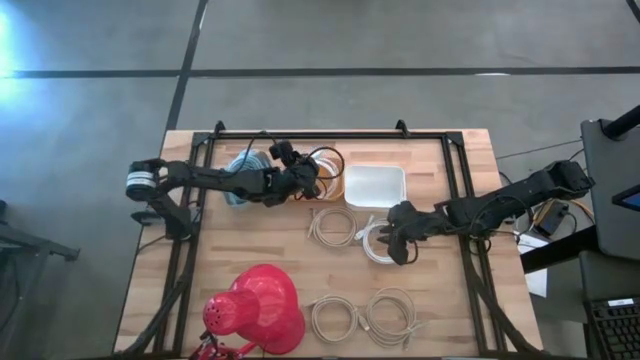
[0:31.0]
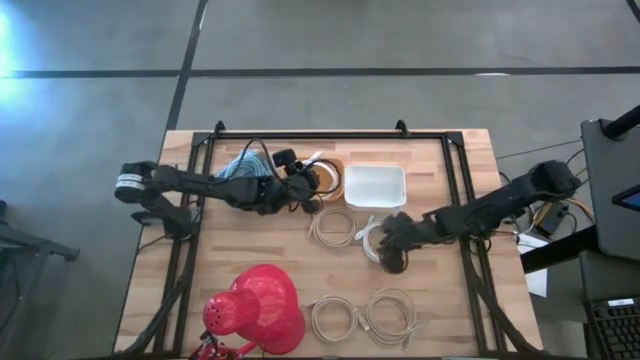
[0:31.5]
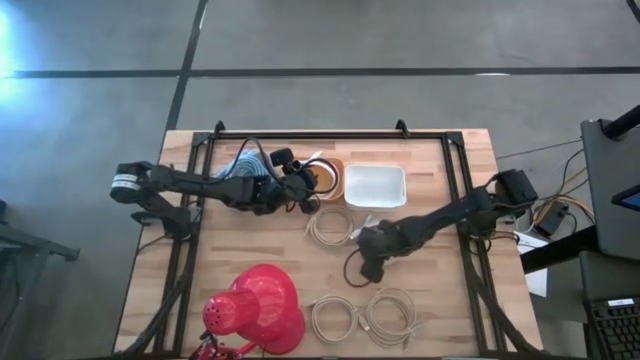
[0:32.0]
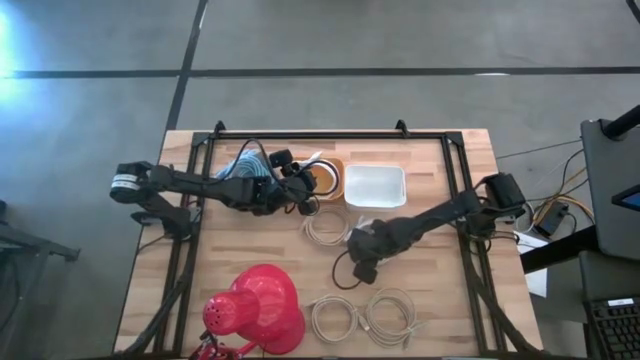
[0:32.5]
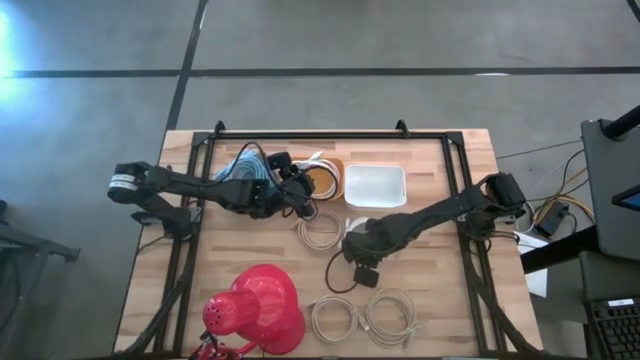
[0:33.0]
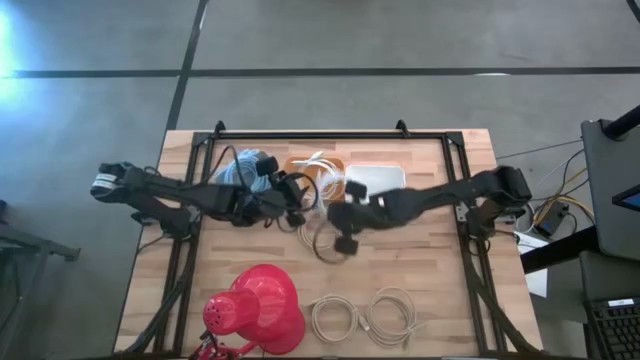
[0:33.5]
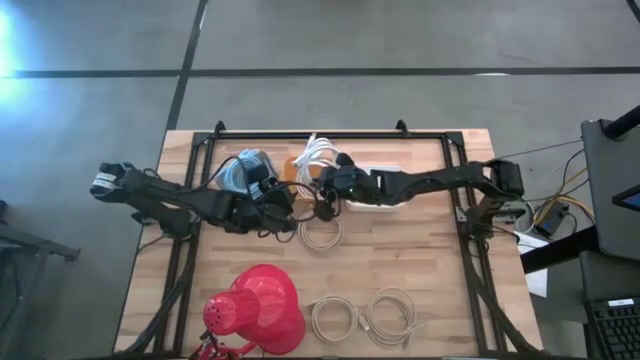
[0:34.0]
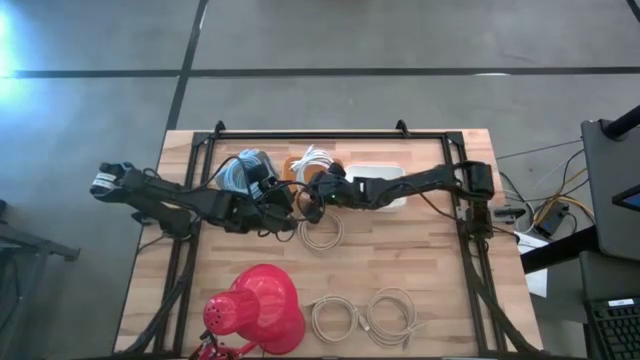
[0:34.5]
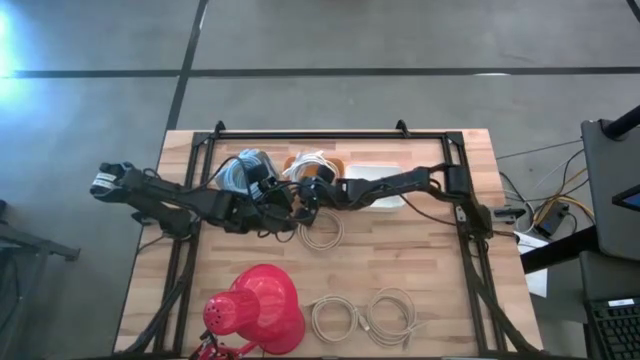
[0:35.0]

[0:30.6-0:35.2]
Task: Sort HDMI cables
Put the white HDMI cable into the orange bin

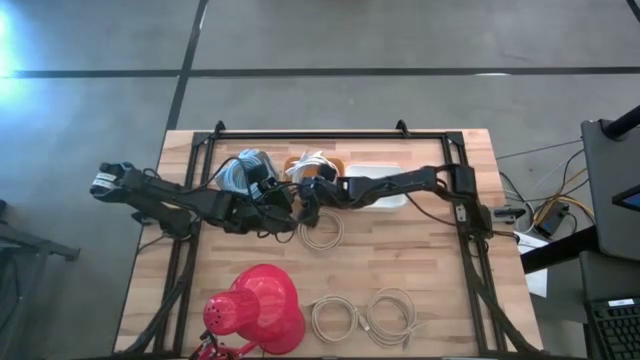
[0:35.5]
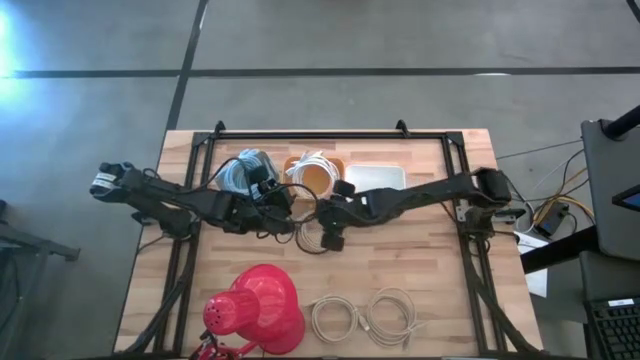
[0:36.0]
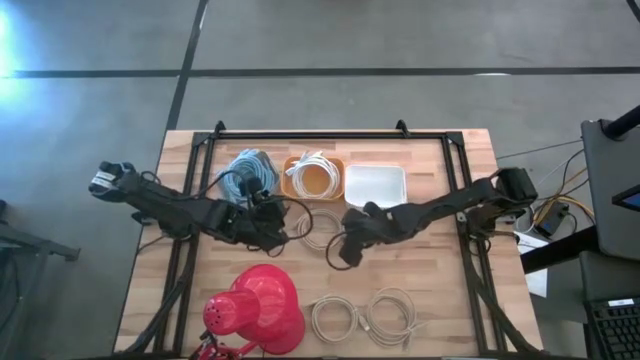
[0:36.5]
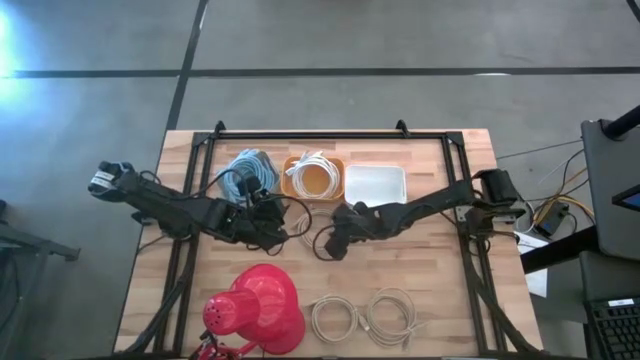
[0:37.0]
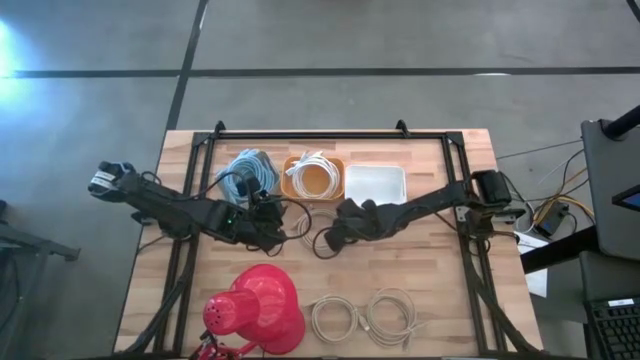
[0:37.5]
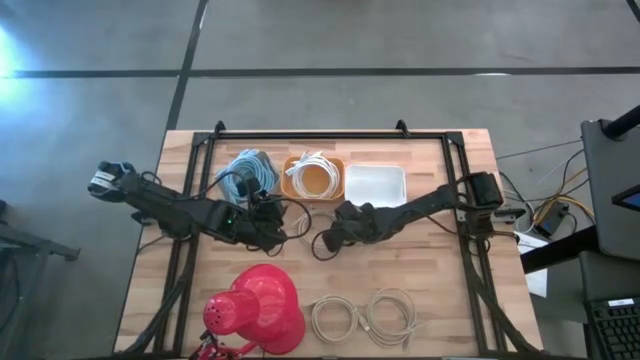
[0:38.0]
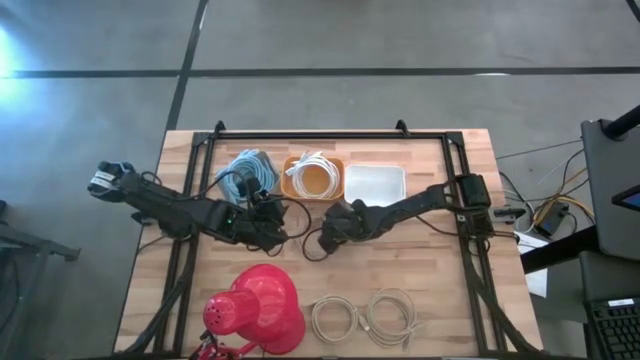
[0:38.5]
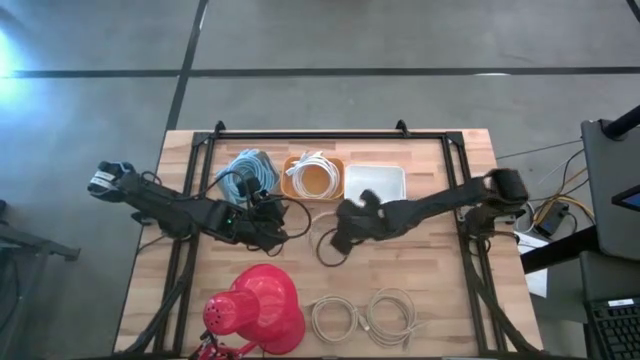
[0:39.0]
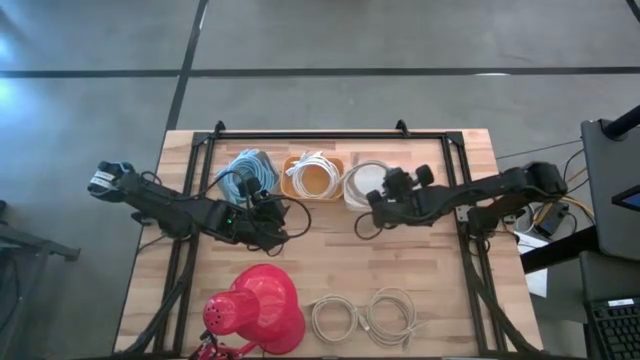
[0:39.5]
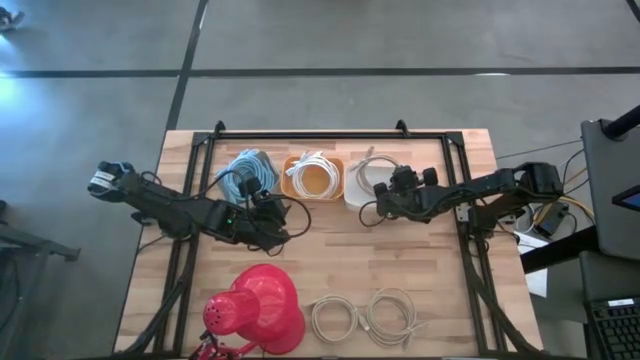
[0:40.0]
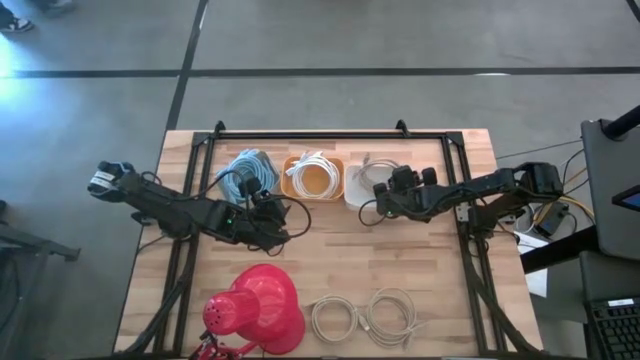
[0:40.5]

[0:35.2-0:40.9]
Put the top light brown HDMI cable into the white bin

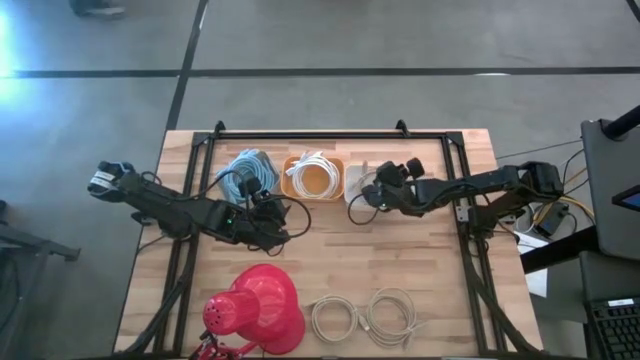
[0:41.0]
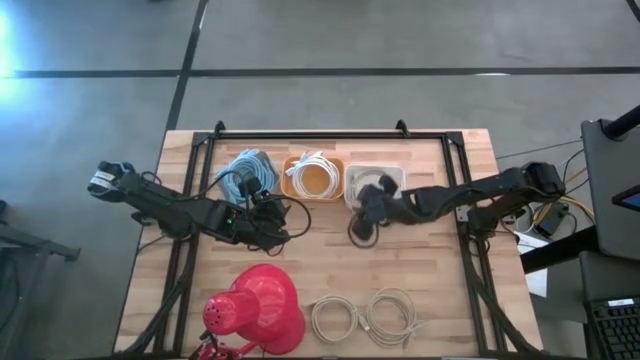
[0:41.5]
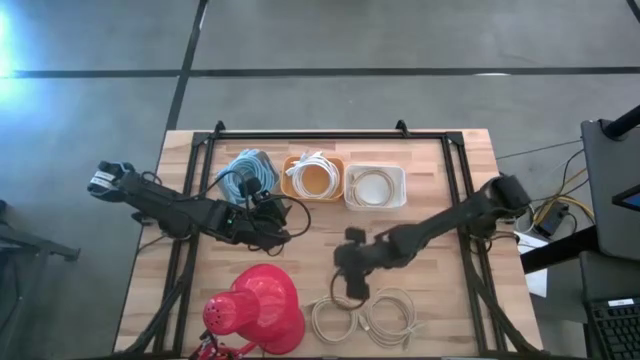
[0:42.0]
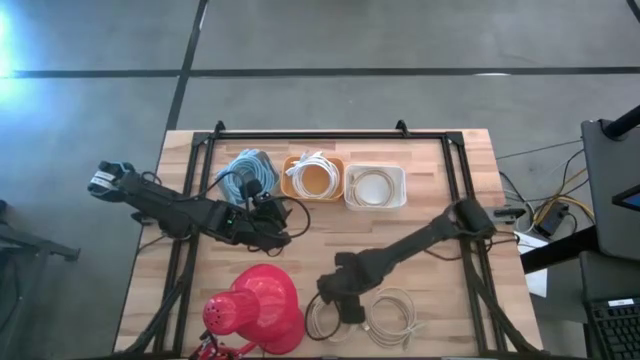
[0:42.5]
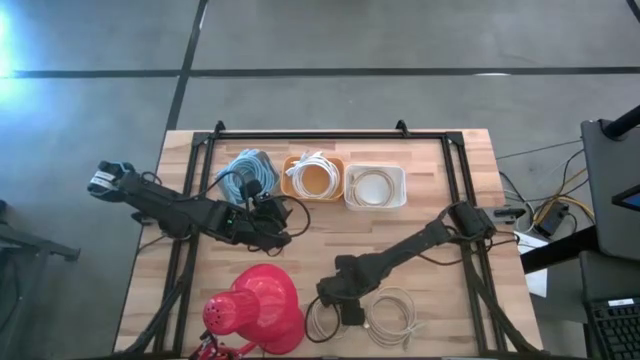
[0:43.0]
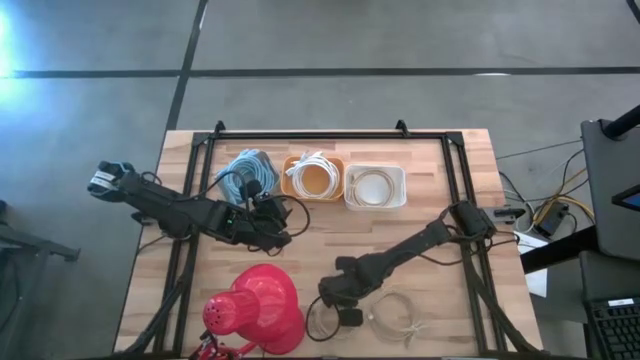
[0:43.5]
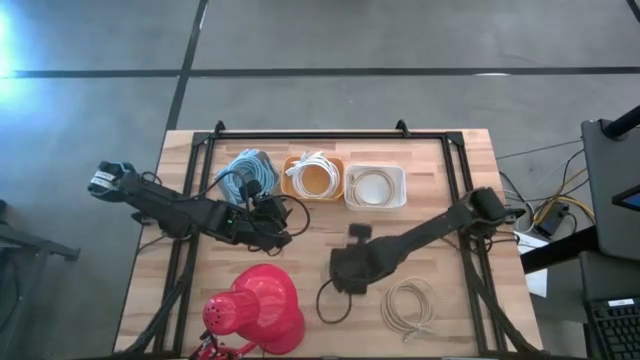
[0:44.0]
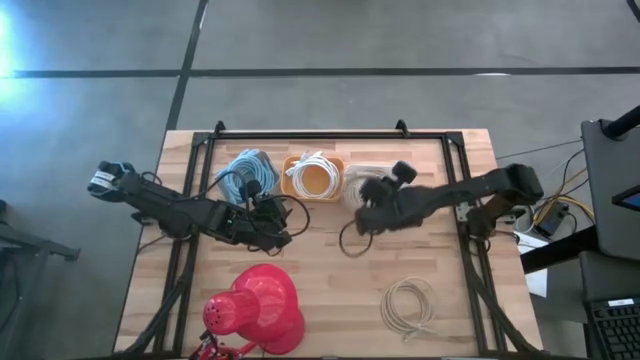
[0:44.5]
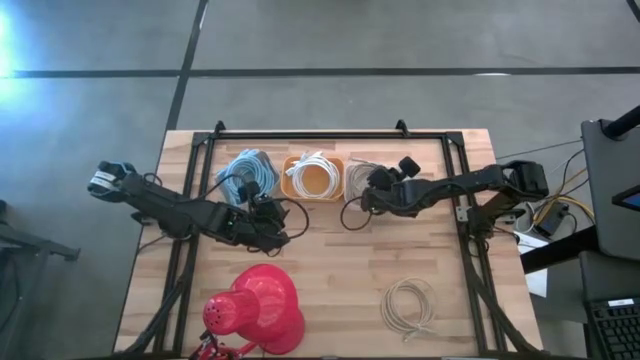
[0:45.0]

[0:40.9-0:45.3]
Put the left light brown HDMI cable into the white bin

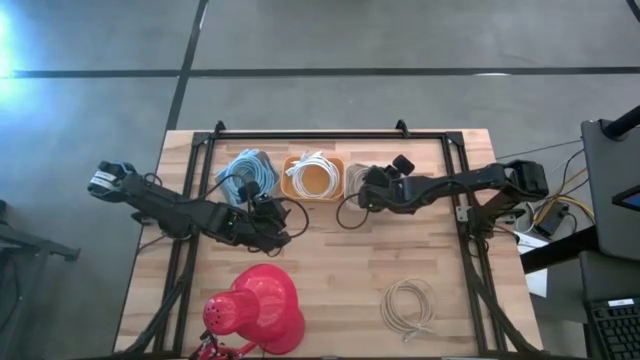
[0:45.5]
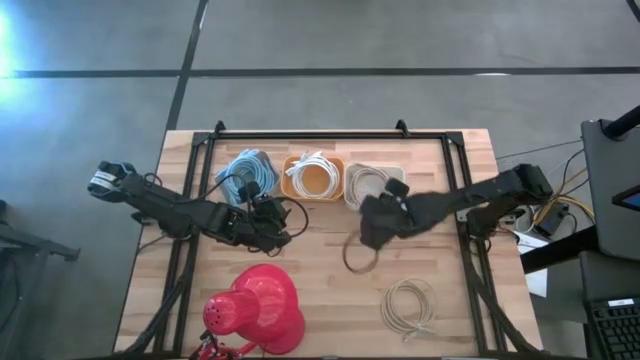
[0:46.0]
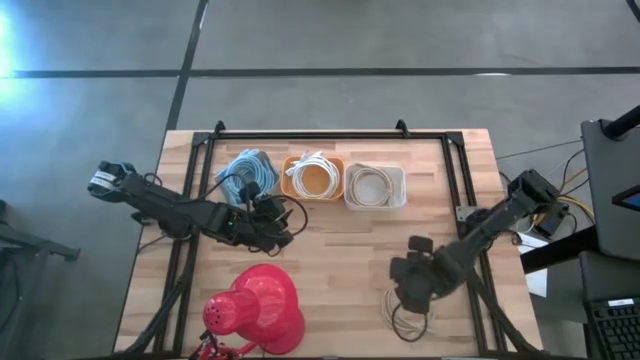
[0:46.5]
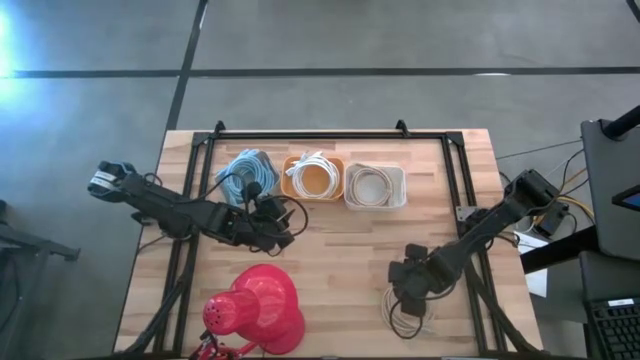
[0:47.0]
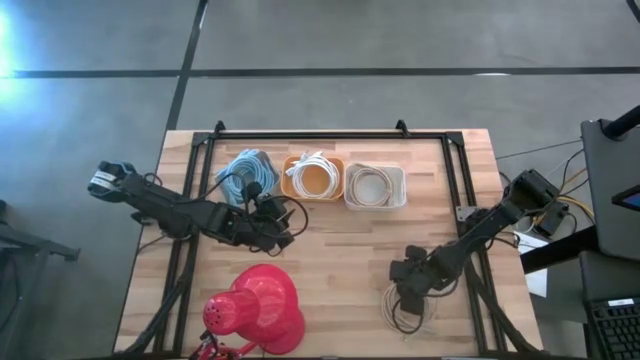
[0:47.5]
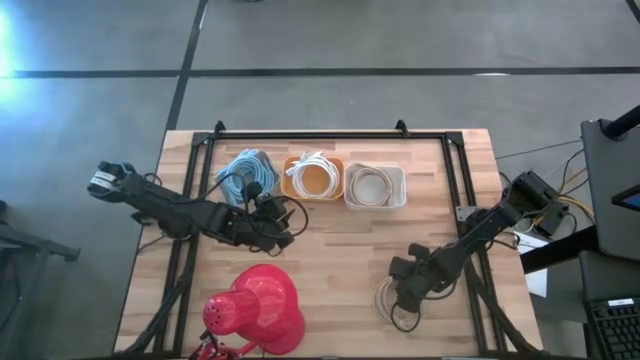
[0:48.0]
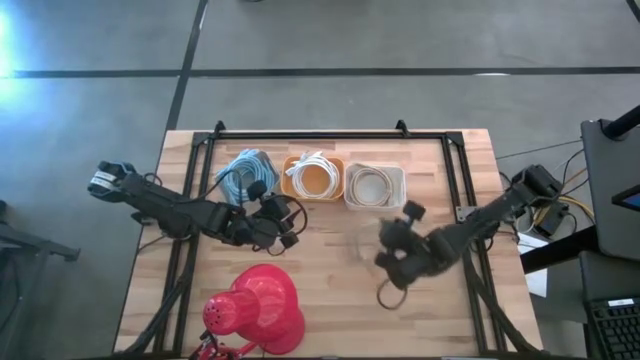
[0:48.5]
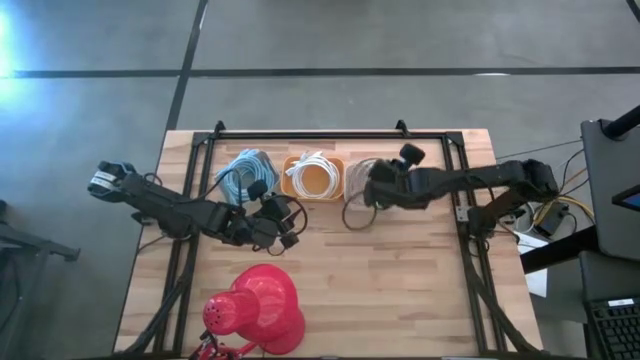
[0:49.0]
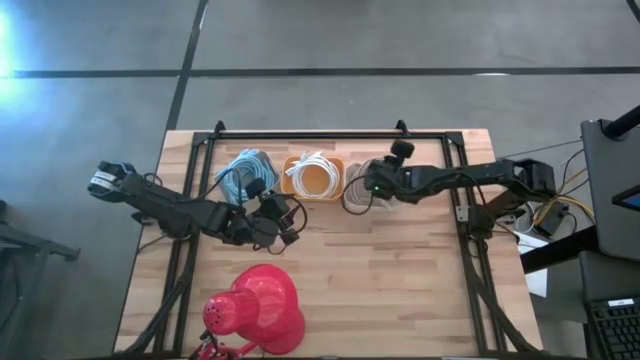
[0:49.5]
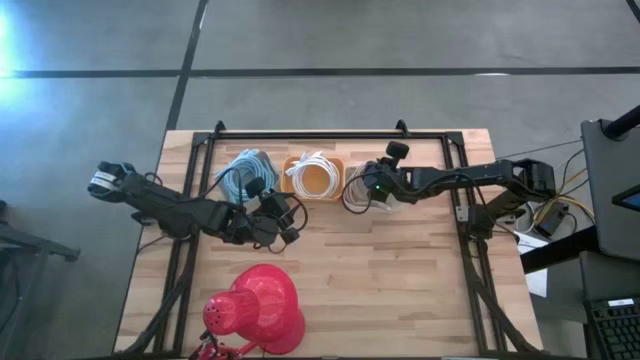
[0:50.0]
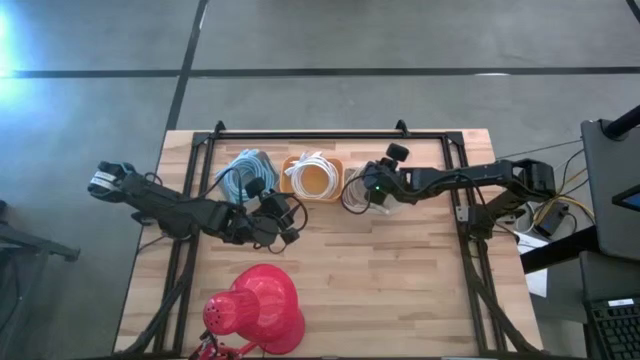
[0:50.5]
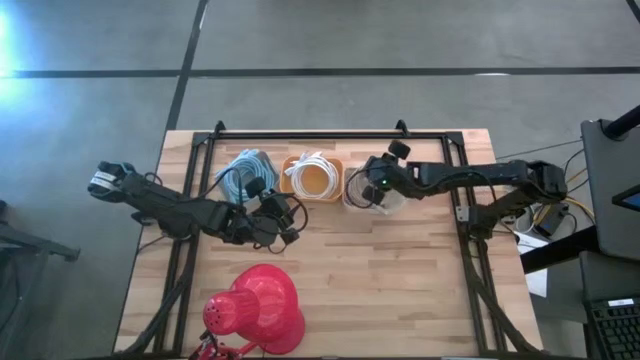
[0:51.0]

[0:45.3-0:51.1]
Put the light brown HDMI cable into the white bin

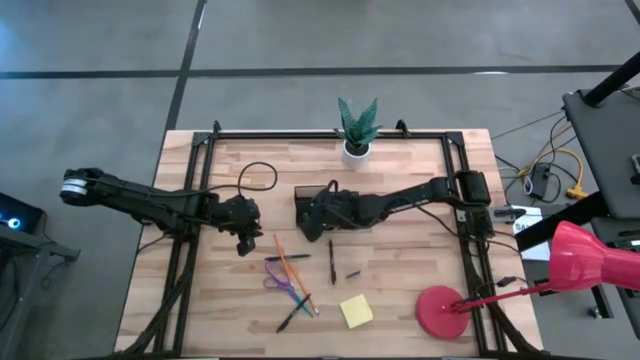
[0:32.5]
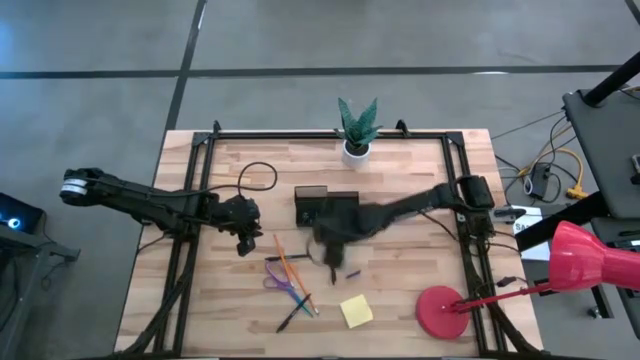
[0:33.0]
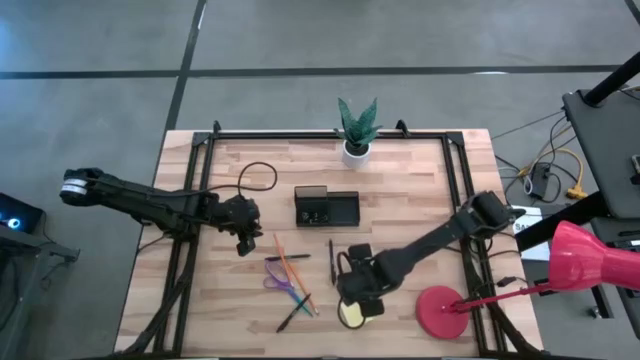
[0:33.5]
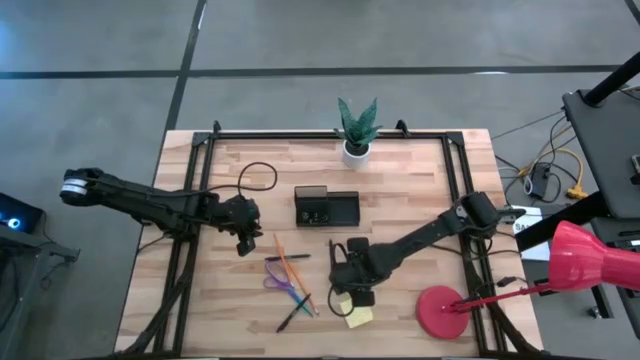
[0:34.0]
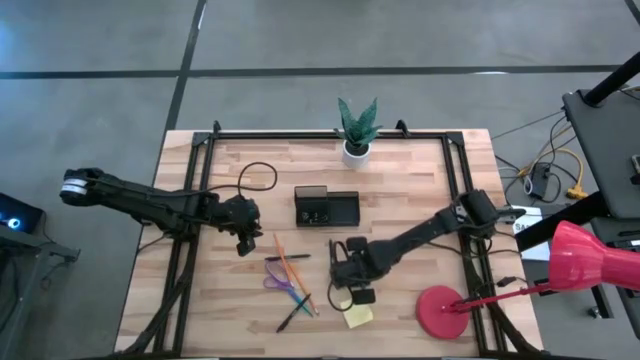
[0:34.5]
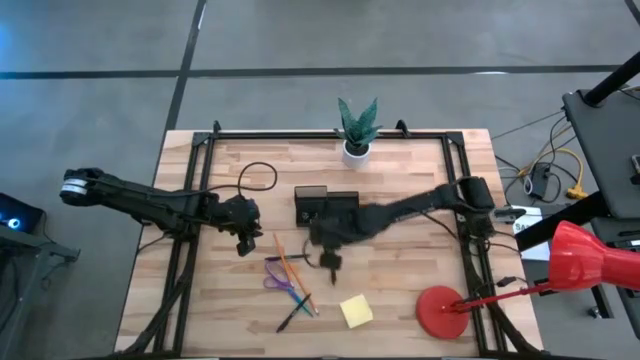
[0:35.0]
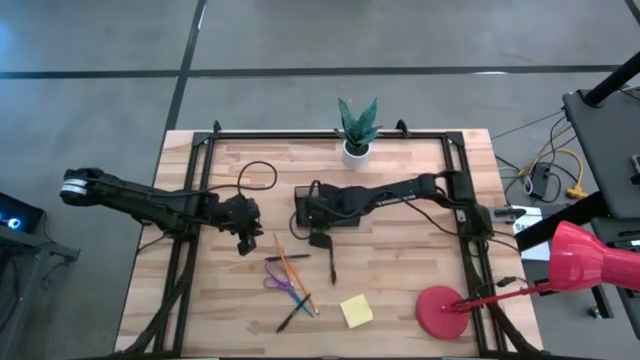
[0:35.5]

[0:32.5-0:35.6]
Task: Pick and place office supplies into organizer
Put the eraser into the desk organizer
